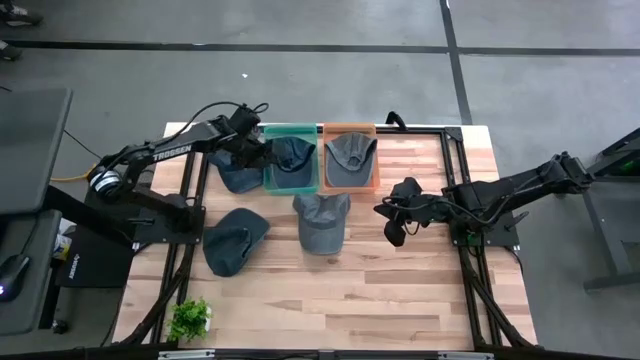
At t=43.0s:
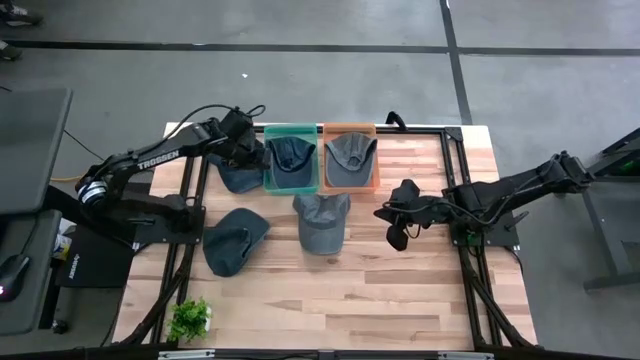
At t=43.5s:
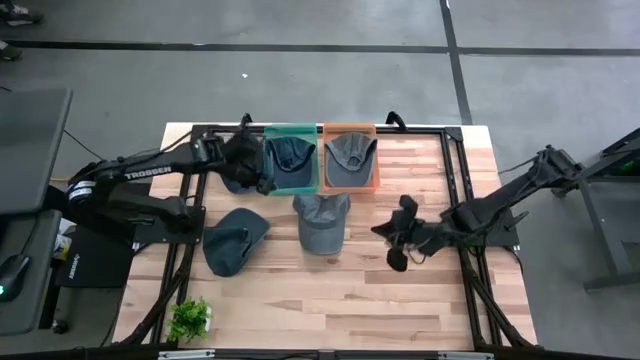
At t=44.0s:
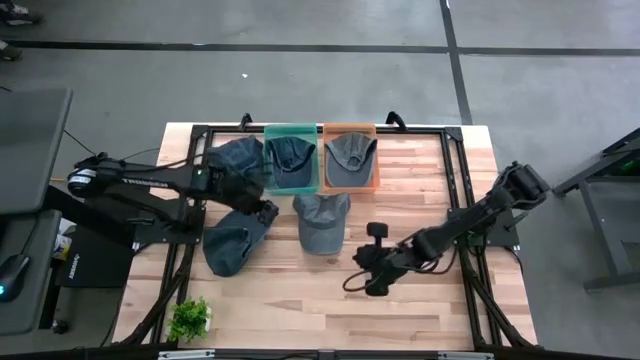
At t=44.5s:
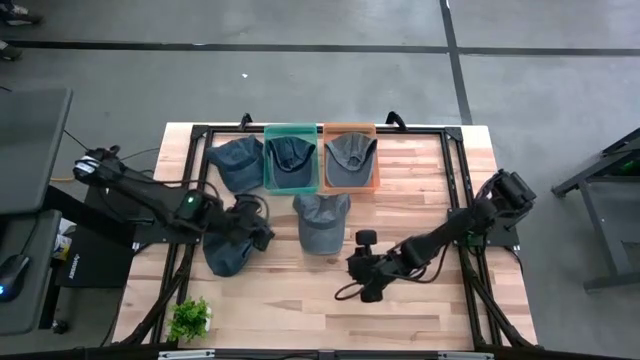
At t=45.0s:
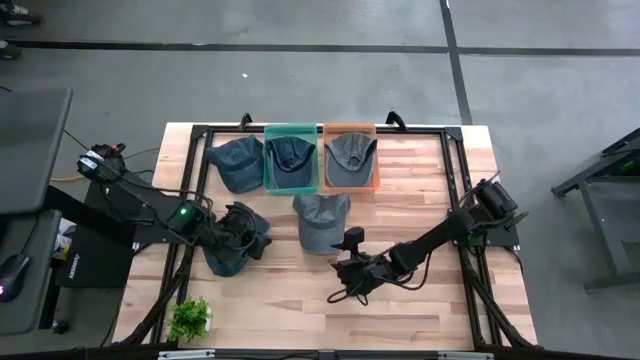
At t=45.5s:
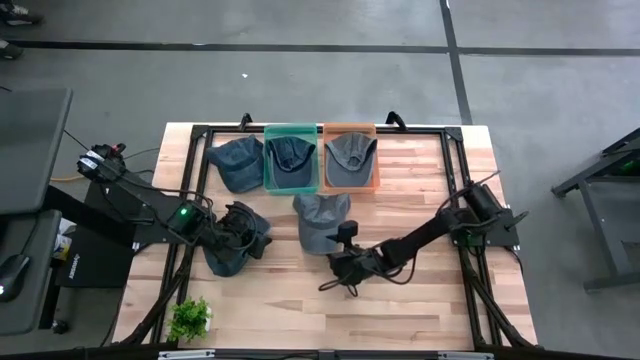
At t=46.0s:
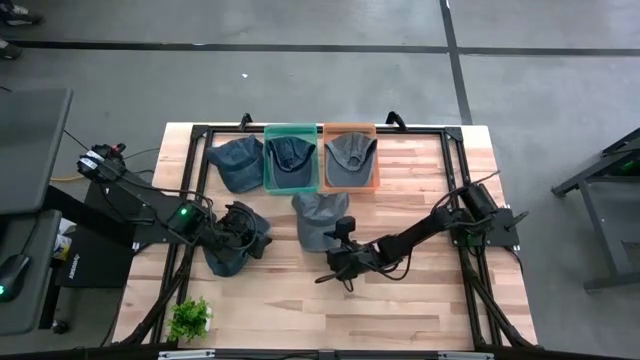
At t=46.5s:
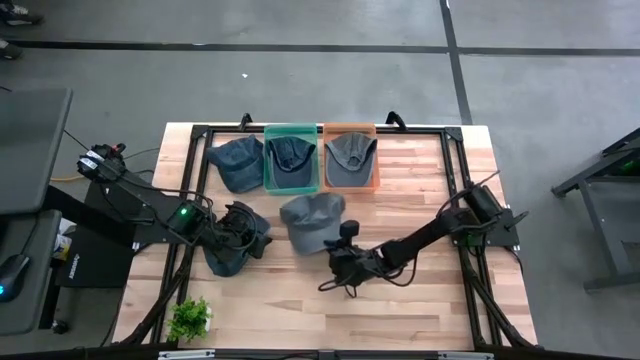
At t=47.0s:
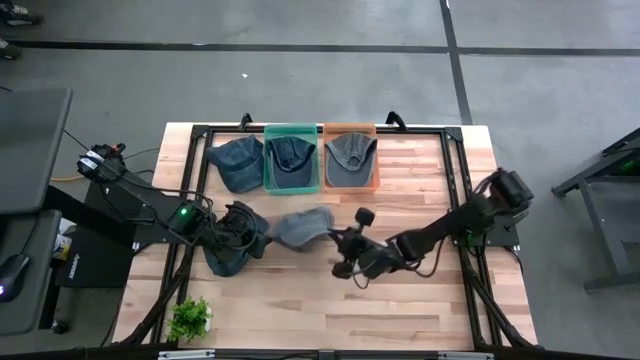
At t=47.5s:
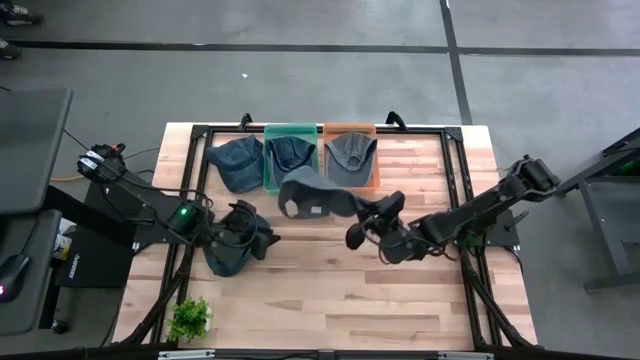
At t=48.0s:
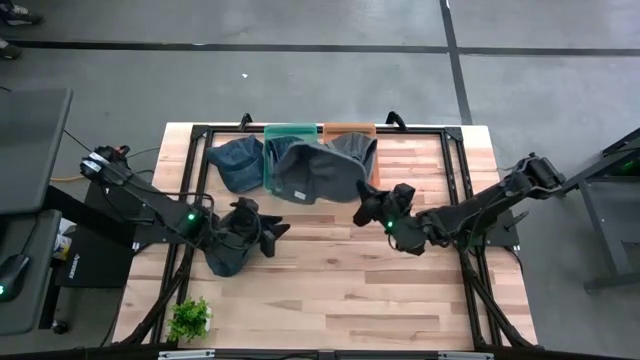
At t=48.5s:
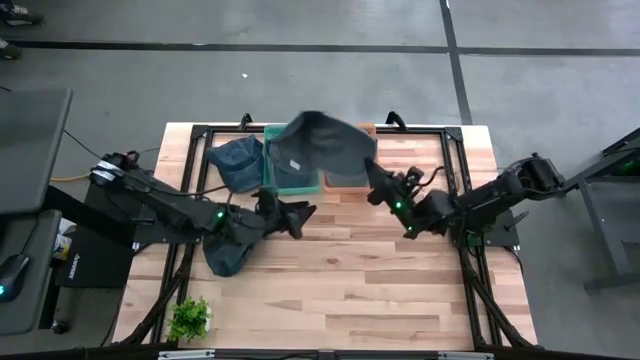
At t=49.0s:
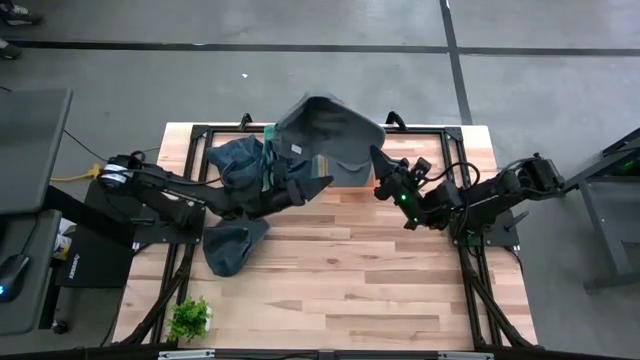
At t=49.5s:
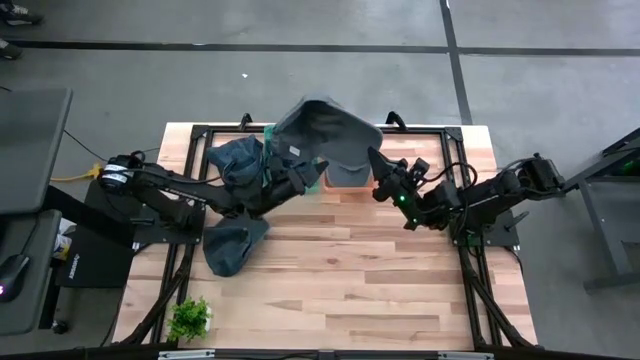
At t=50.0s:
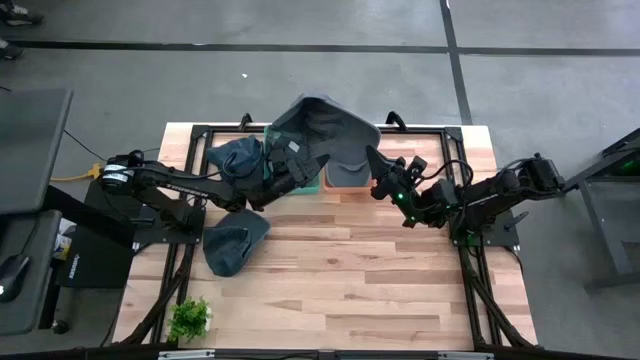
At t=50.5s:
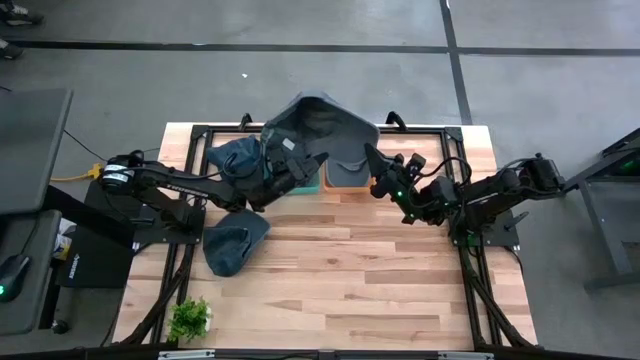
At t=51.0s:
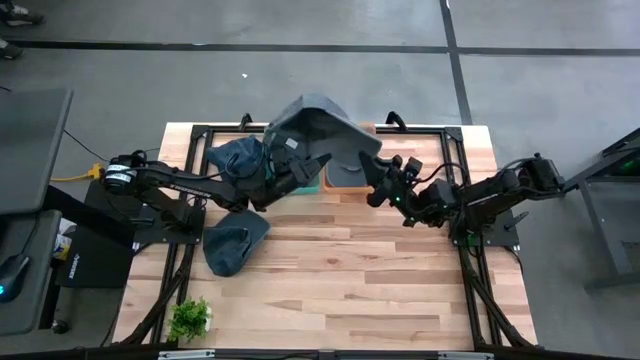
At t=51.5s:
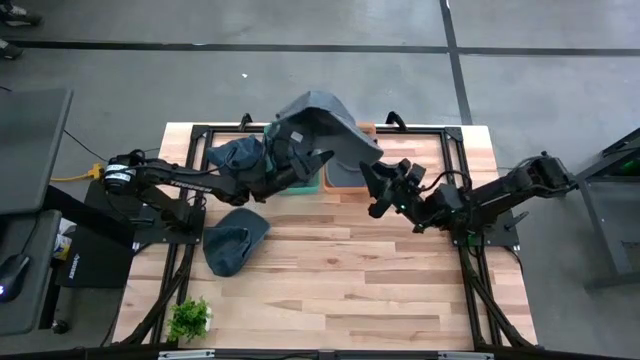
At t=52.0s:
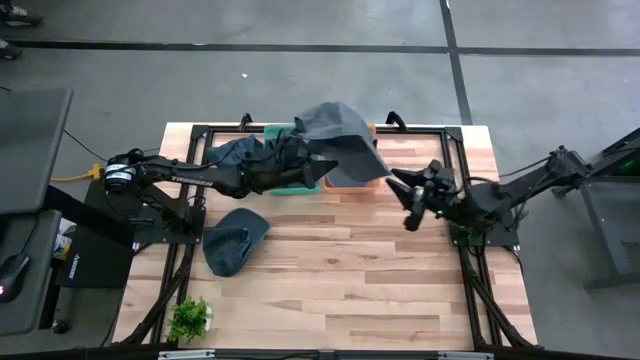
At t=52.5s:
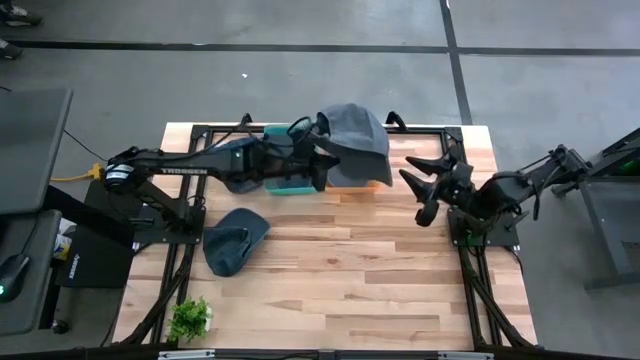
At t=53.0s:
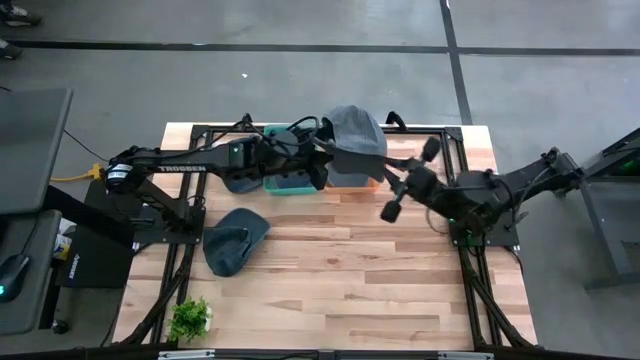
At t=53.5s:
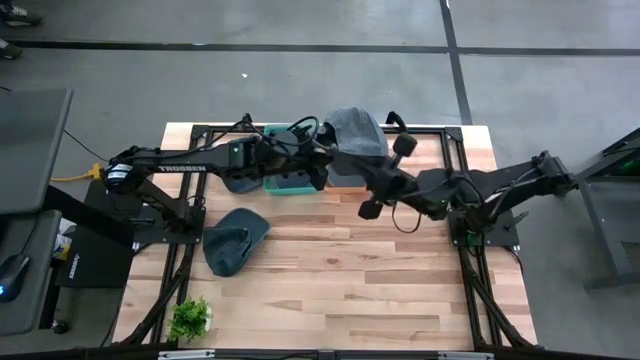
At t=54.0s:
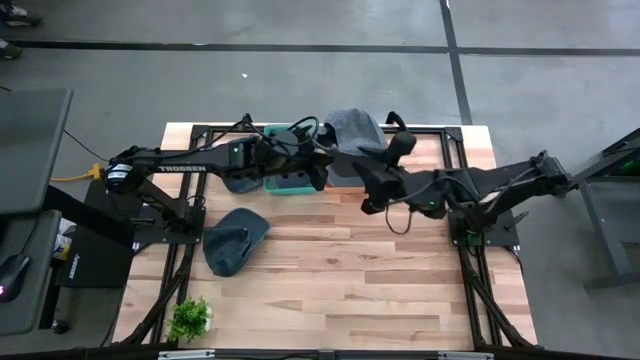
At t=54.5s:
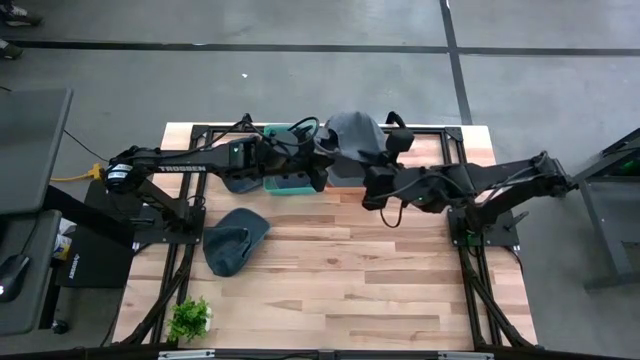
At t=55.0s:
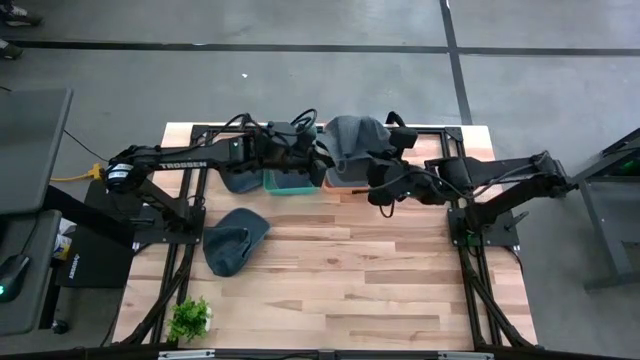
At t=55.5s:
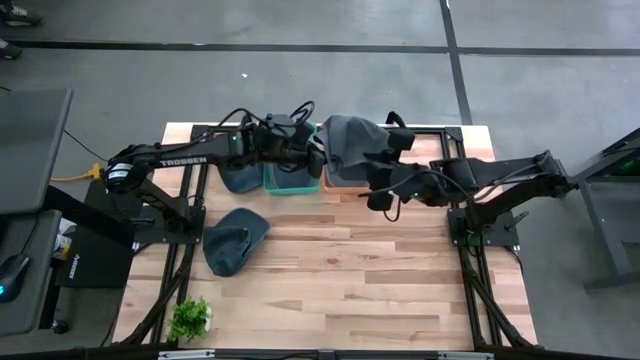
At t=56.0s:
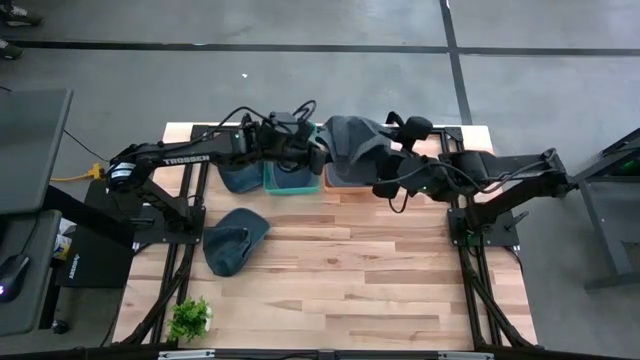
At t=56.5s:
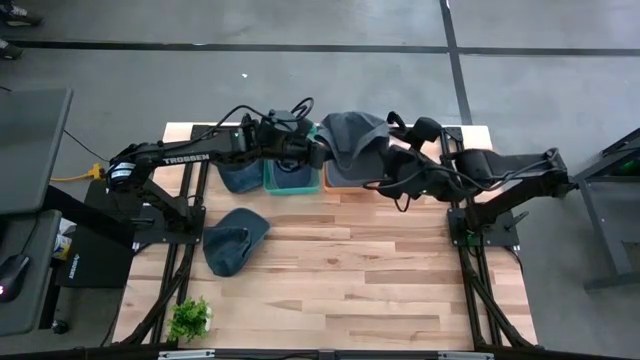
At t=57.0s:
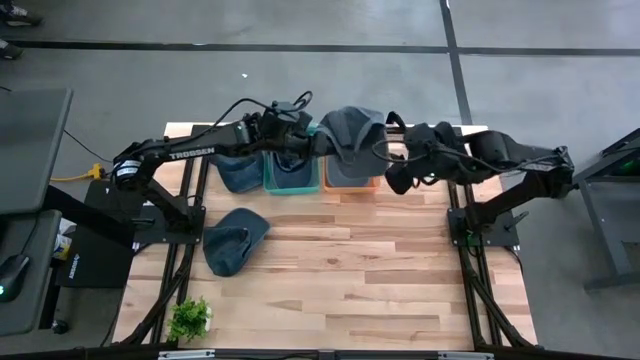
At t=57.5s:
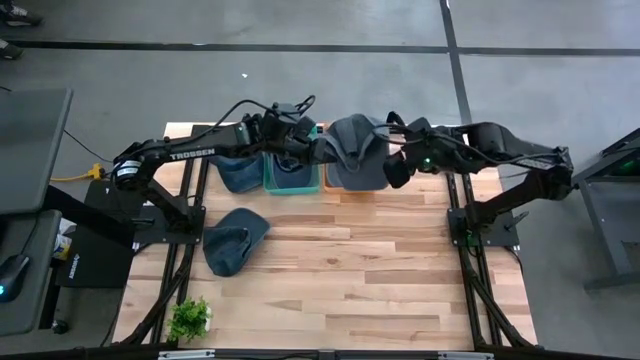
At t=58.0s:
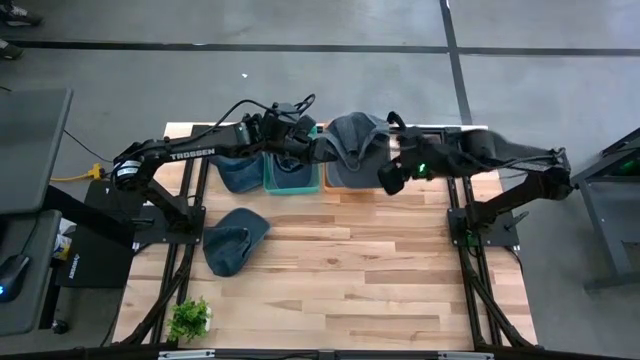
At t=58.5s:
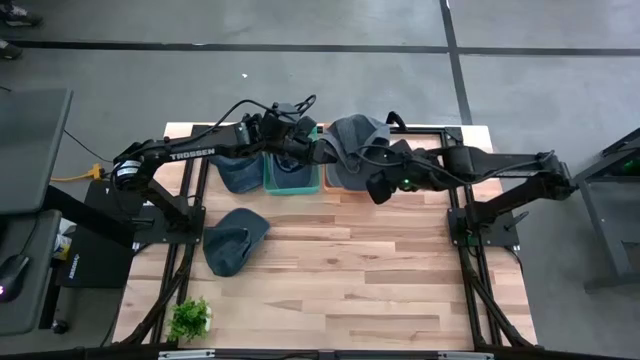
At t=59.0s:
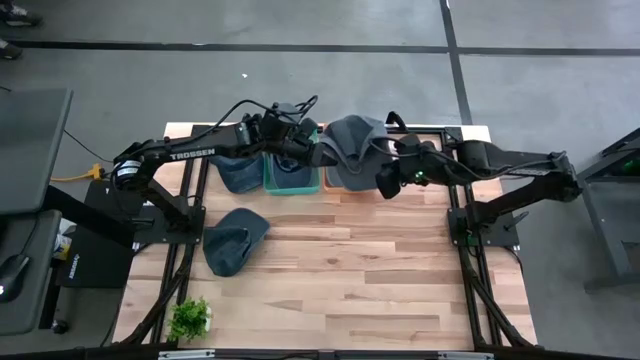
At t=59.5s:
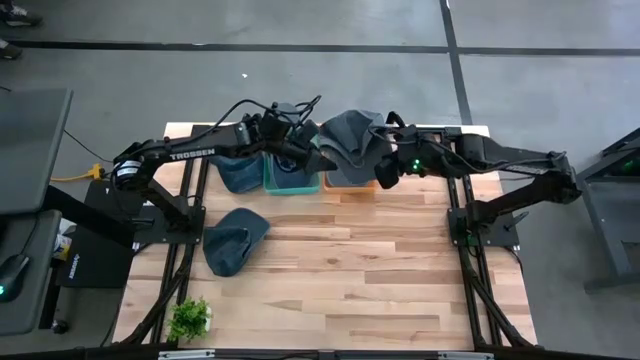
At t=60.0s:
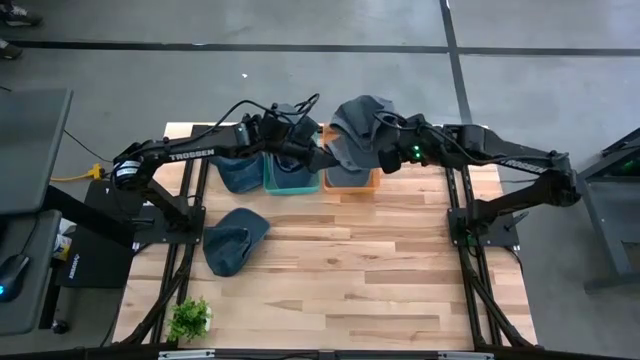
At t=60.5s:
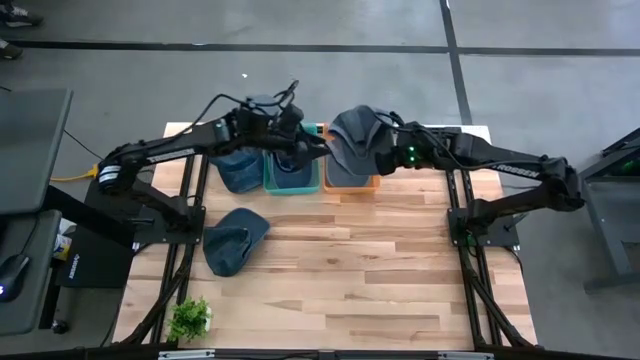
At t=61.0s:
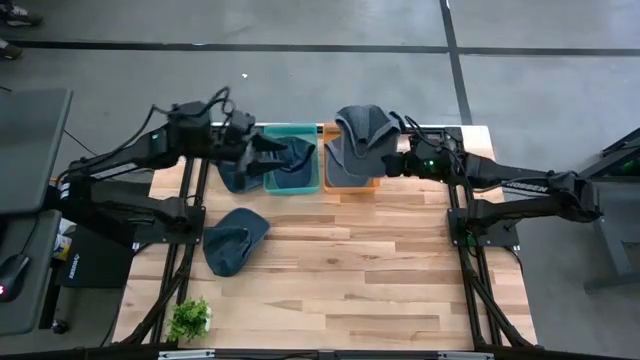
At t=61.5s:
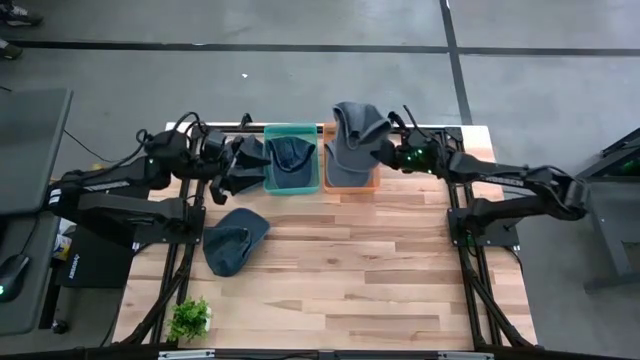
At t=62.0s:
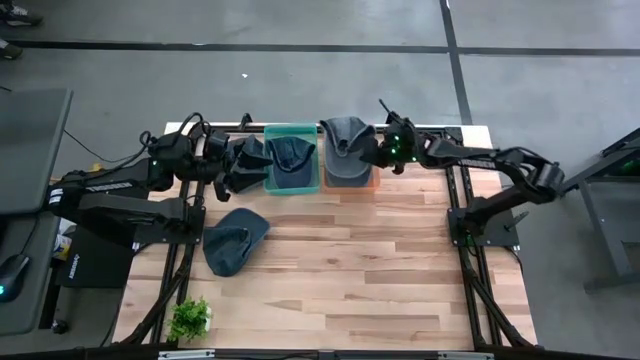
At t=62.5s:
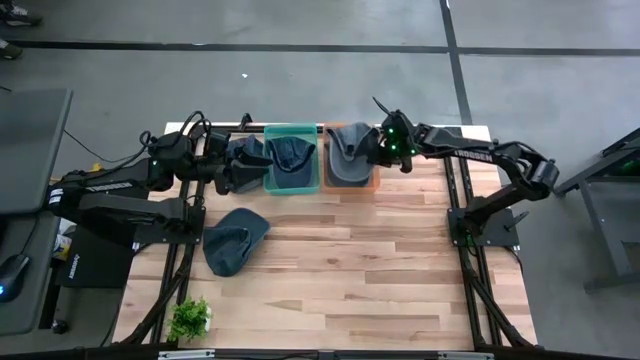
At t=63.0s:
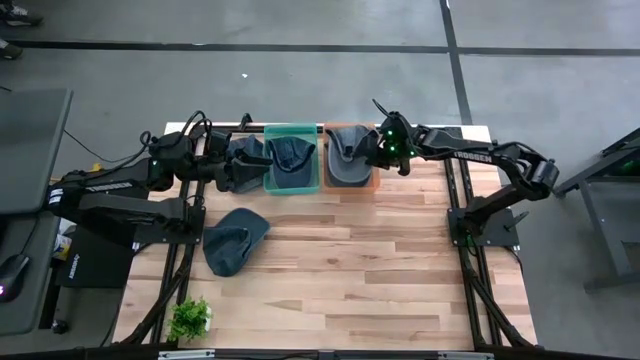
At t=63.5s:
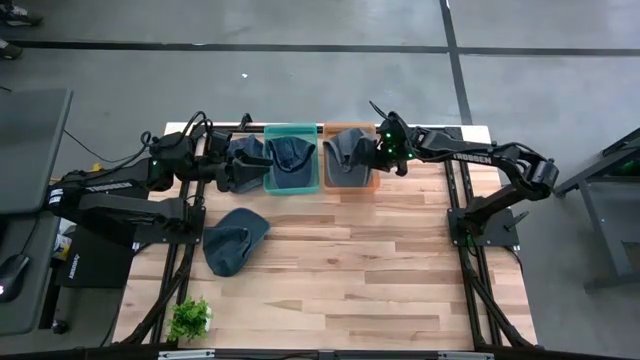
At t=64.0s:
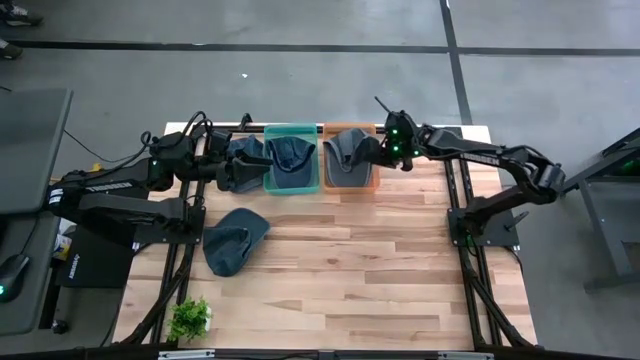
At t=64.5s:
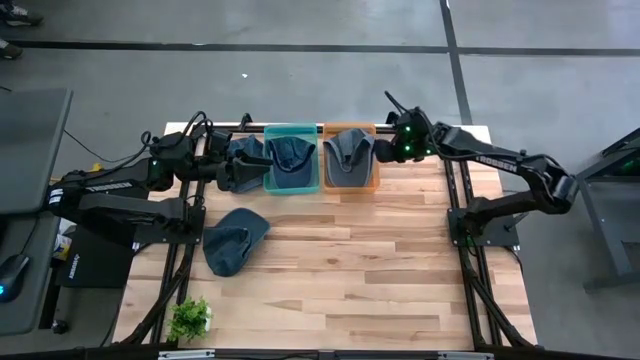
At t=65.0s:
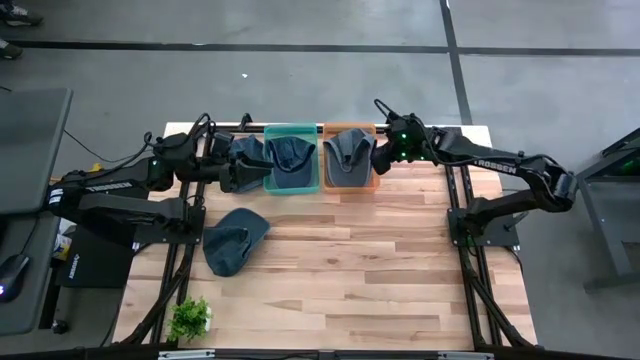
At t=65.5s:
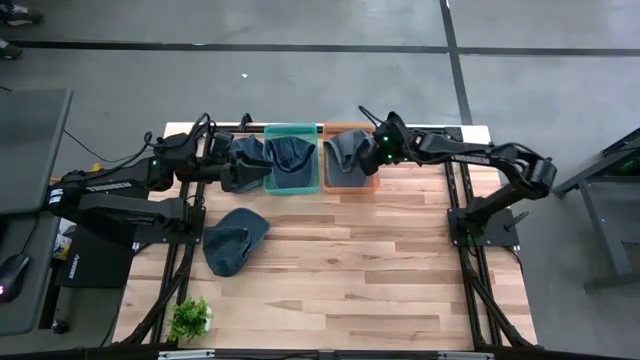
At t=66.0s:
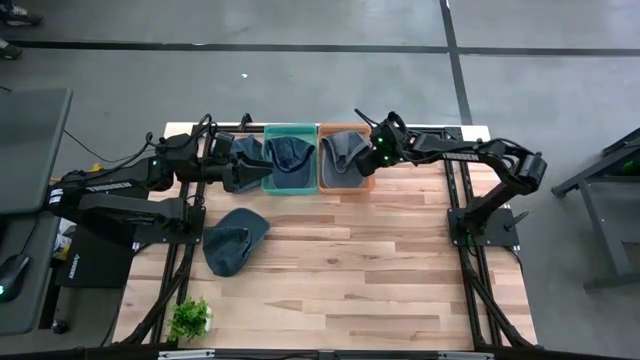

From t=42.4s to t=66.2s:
Task: Pick & Place hat
Put the gray cap into the orange bin
